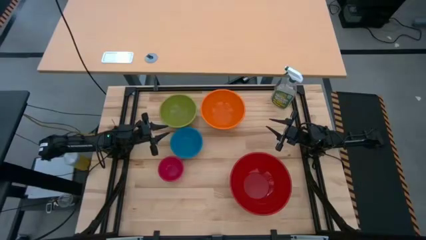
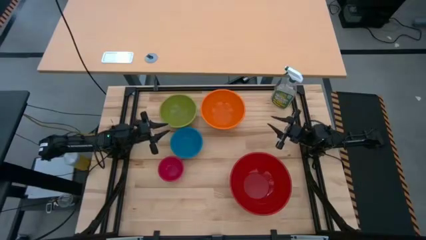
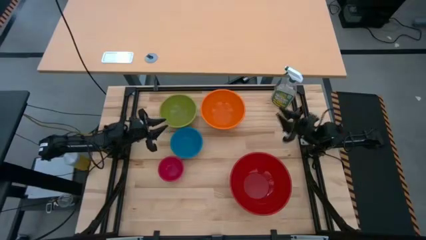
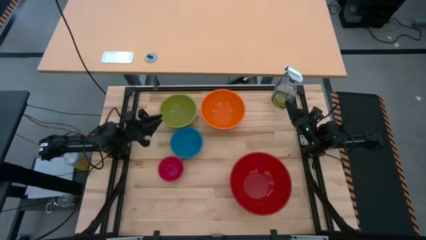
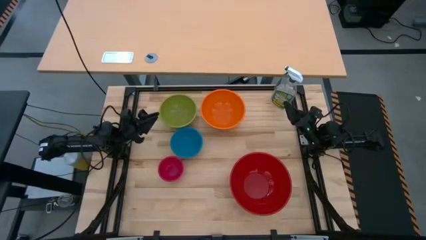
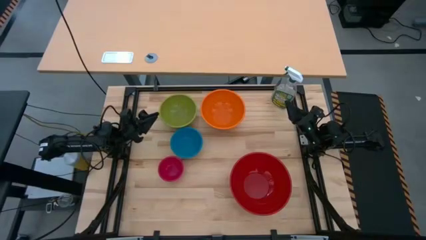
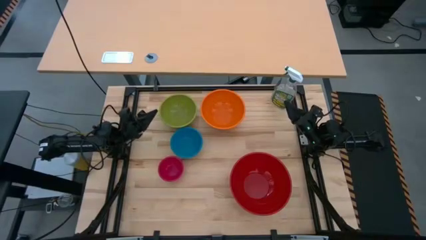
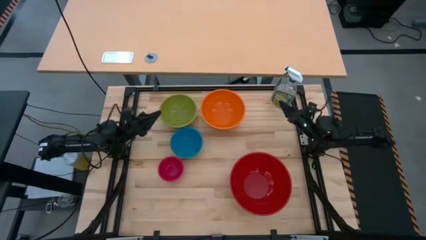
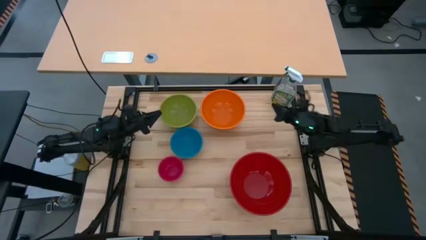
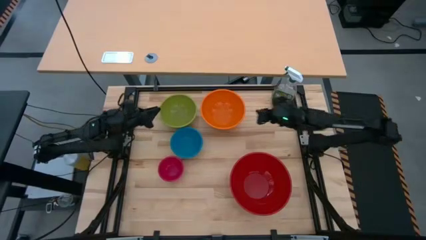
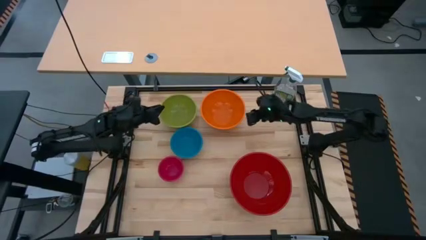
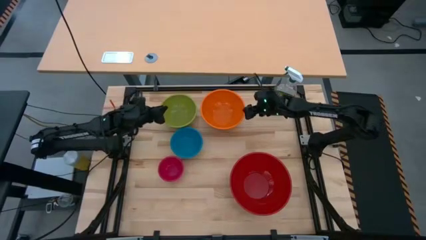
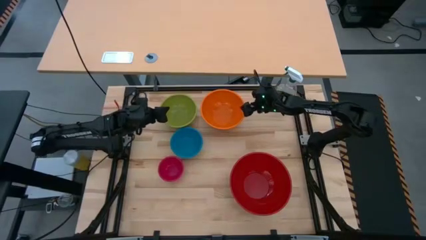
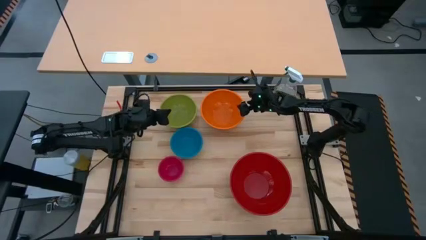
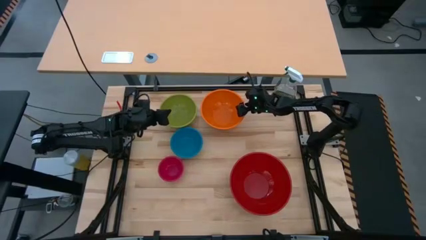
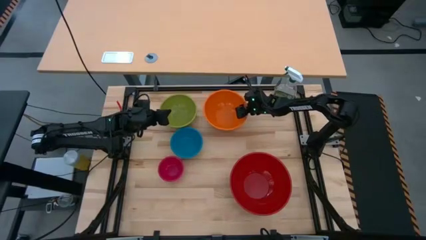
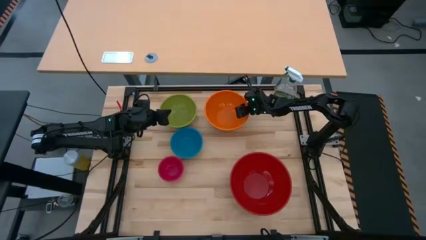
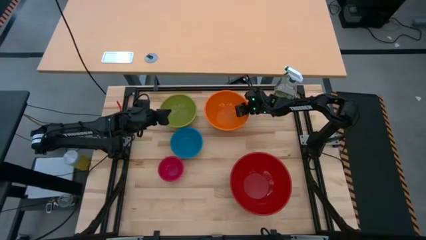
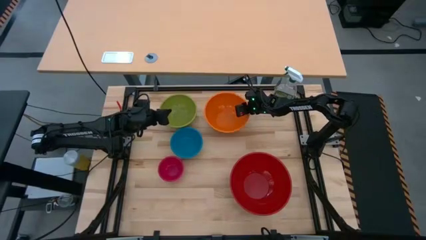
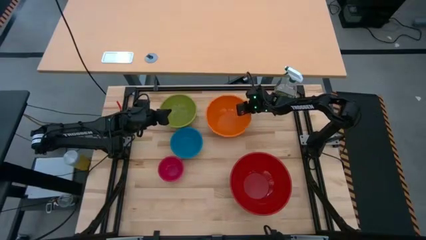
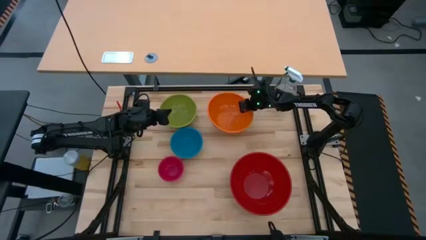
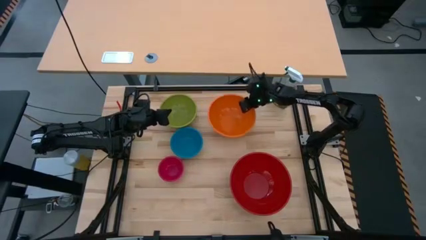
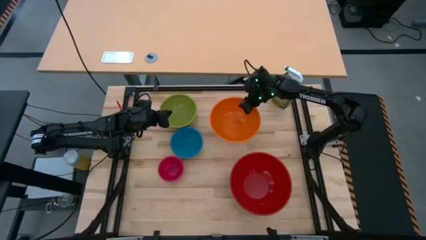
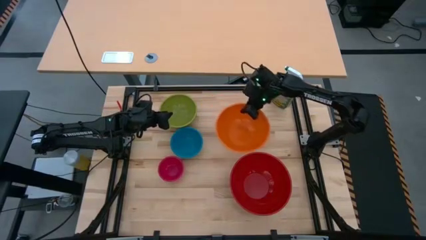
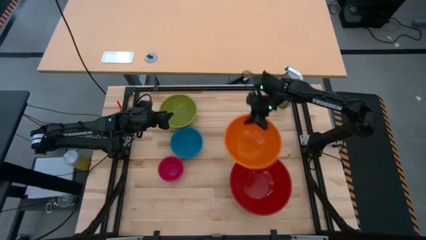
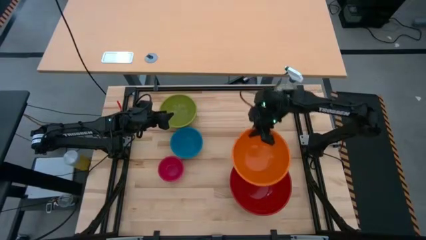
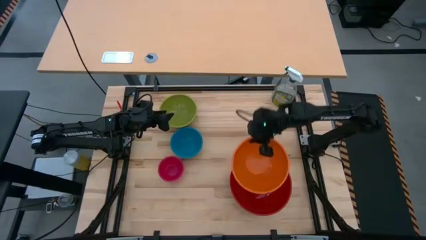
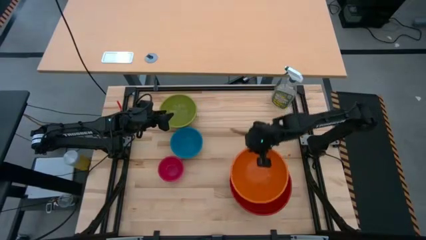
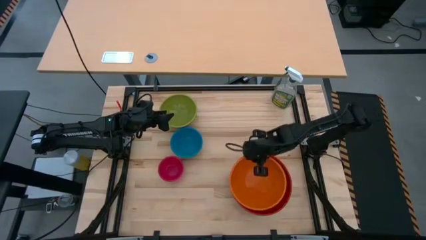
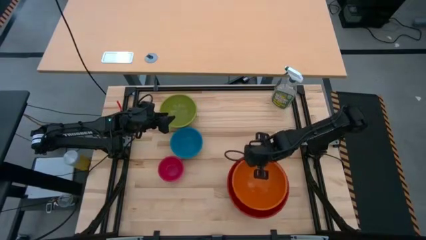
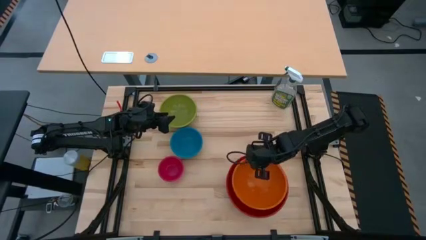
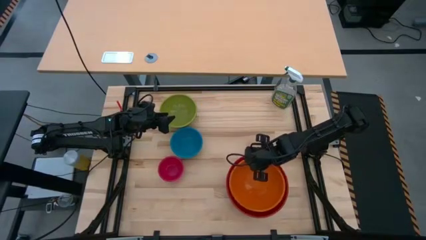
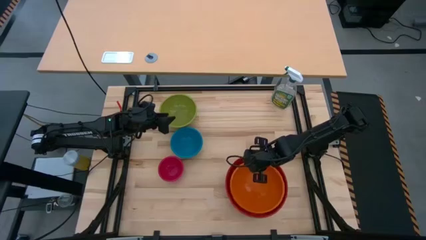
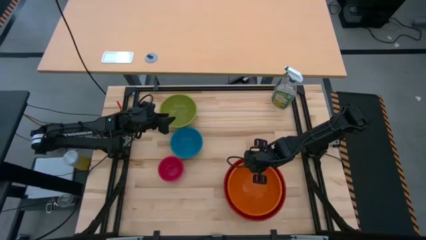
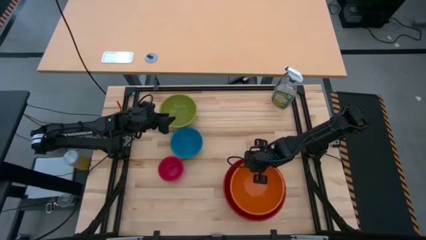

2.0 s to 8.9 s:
Stack the orange bowl on the red bowl

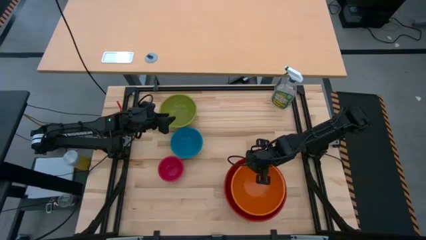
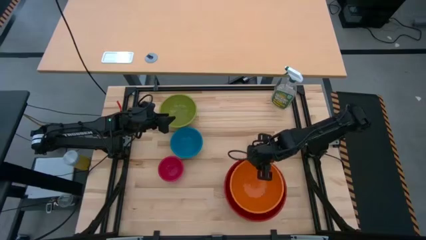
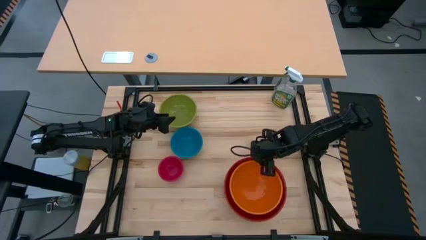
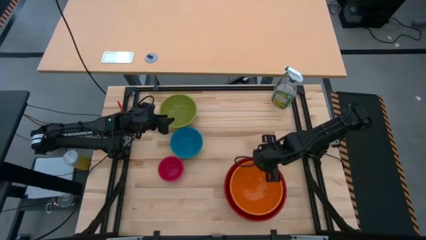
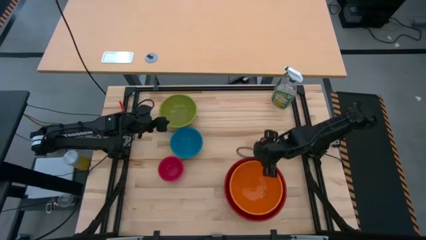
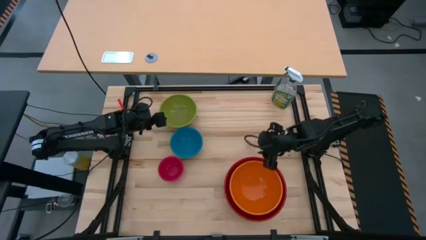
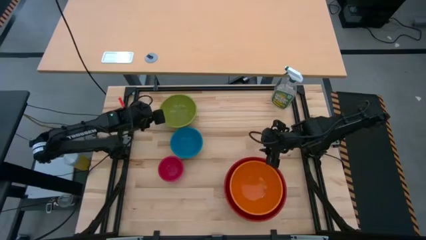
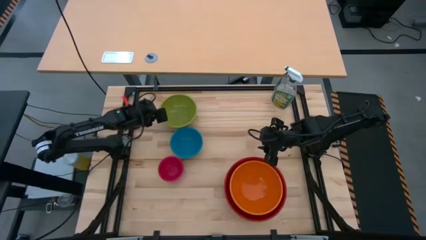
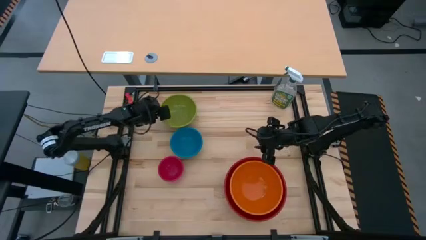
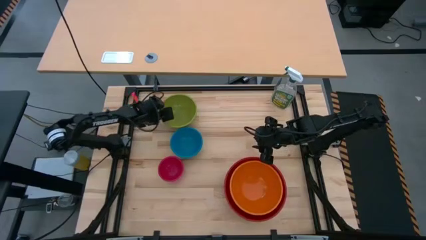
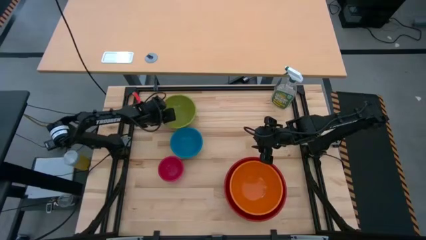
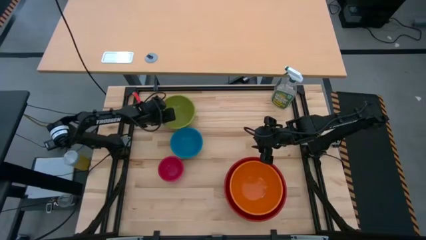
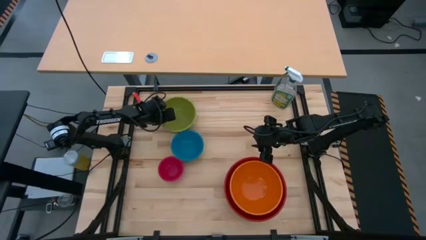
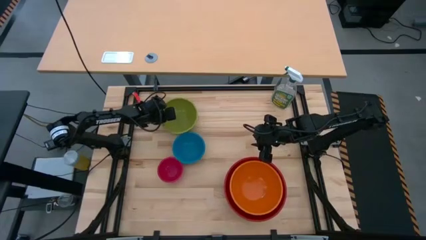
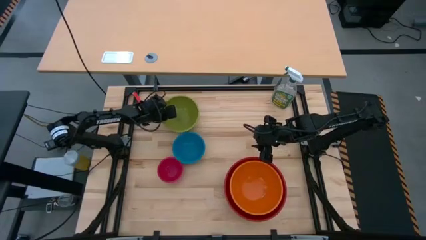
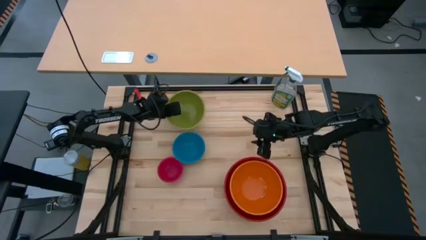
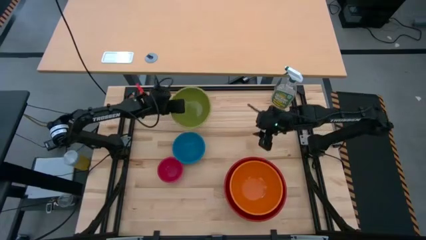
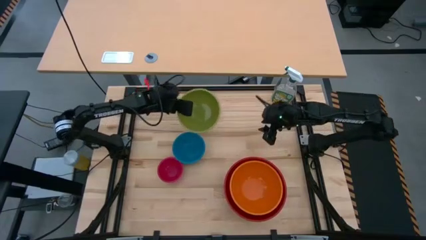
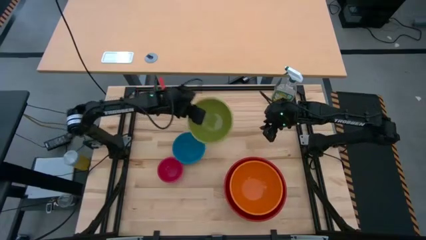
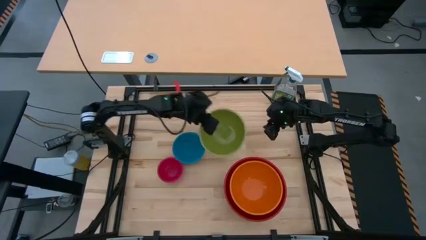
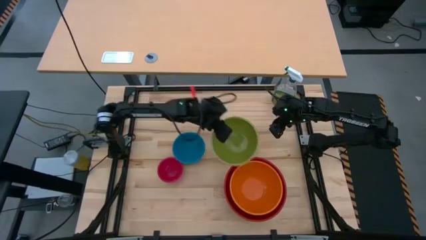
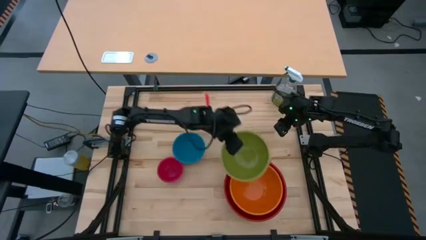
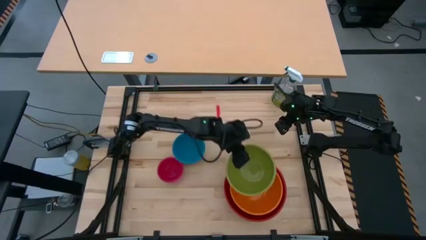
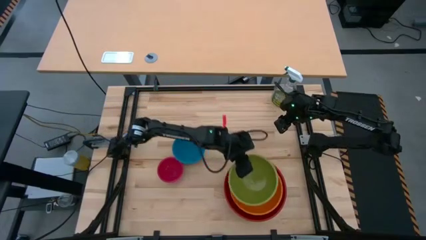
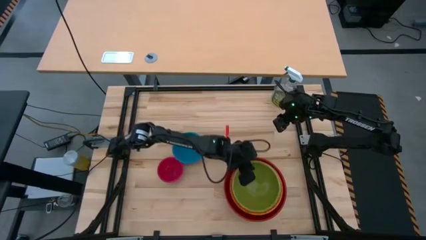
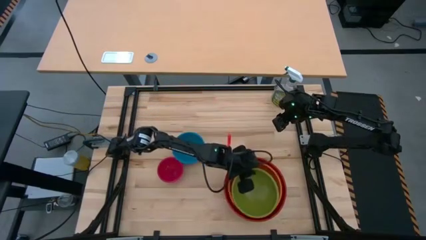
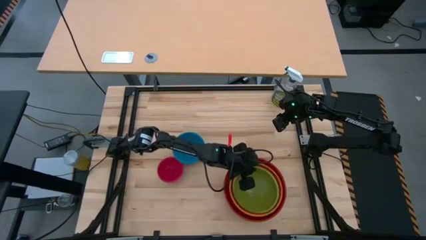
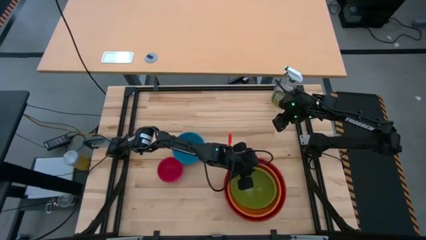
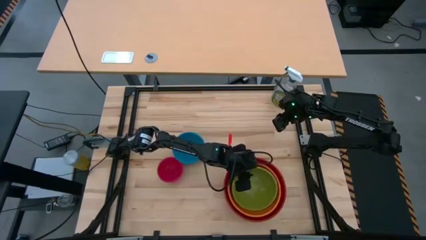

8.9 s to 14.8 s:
Stack the light green bowl on the orange bowl

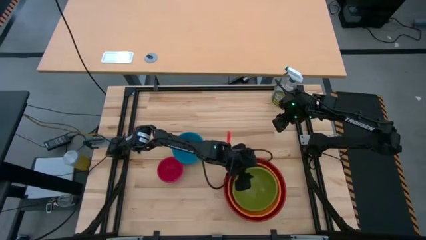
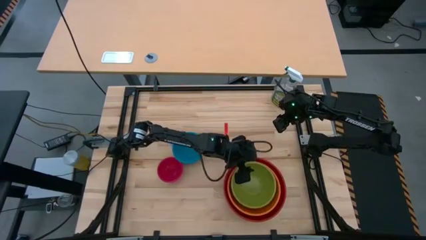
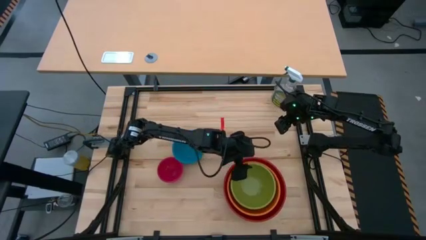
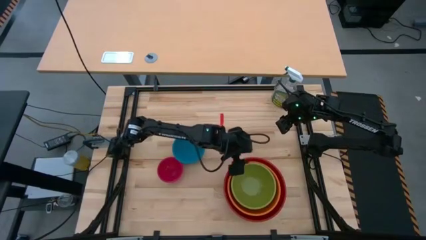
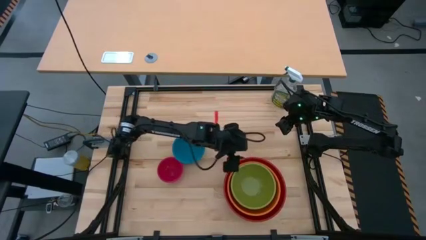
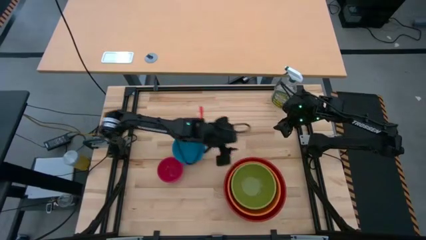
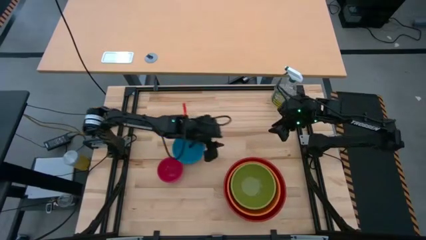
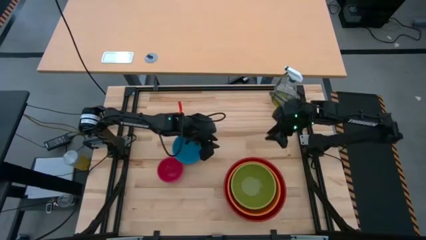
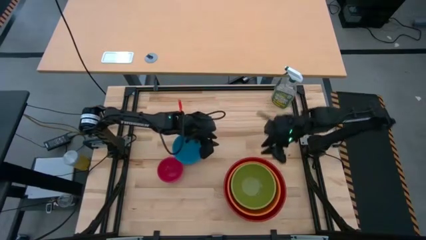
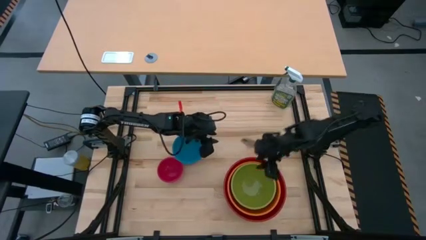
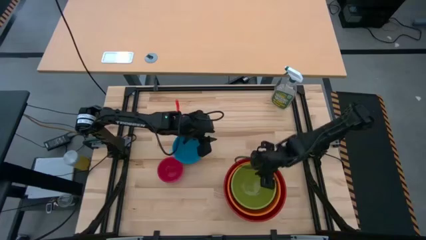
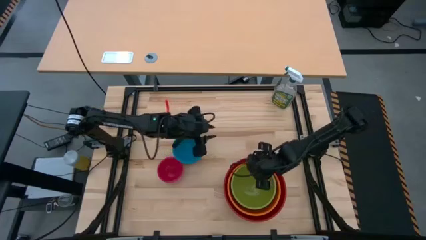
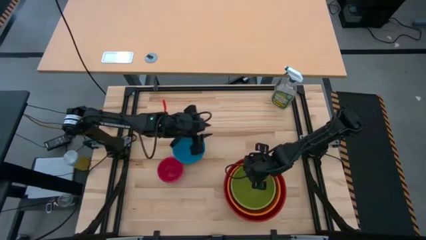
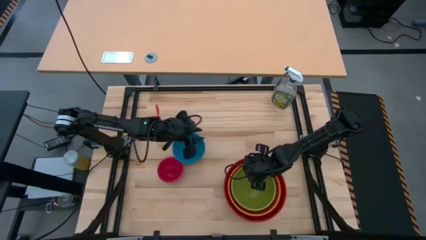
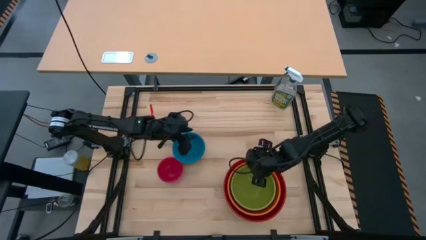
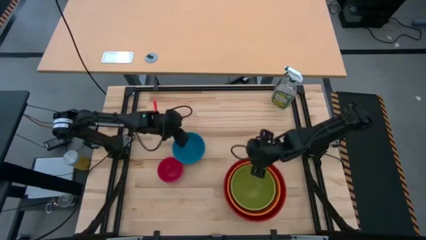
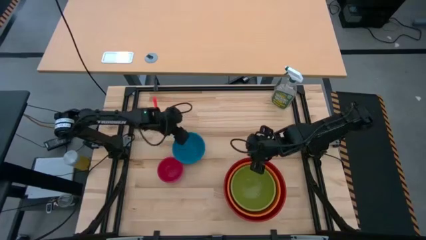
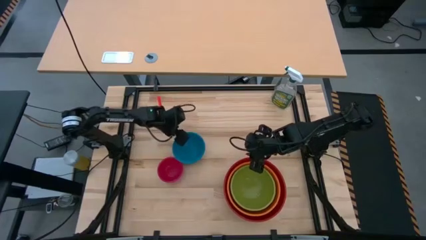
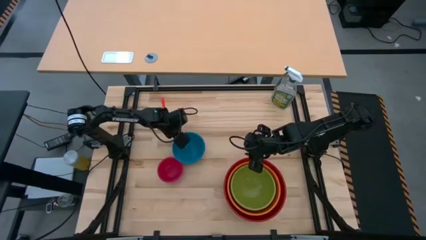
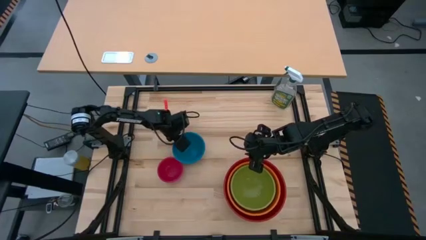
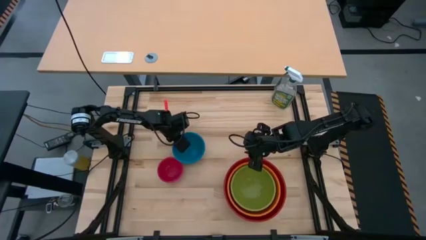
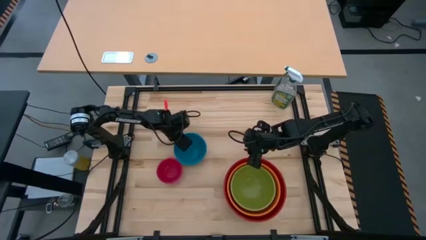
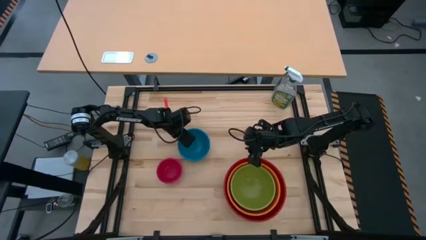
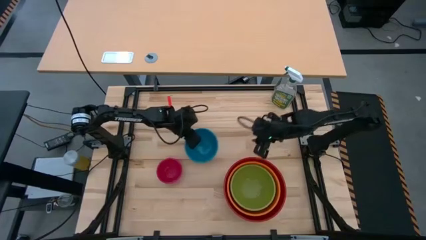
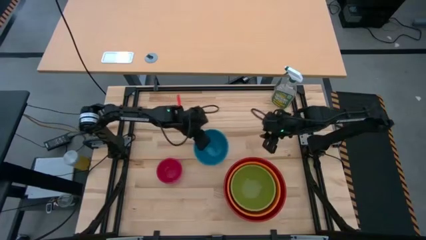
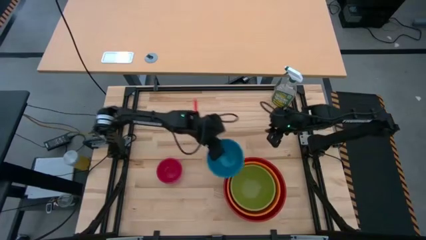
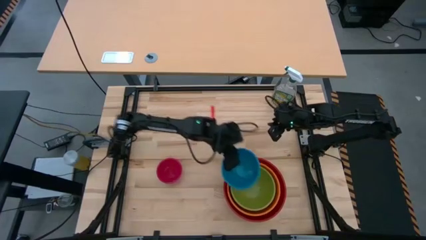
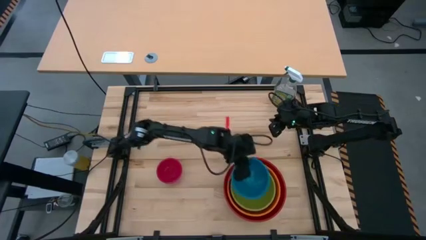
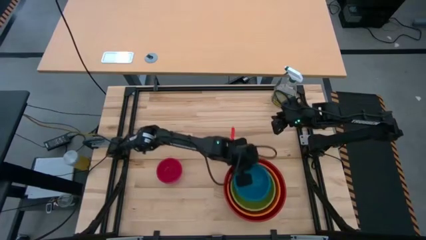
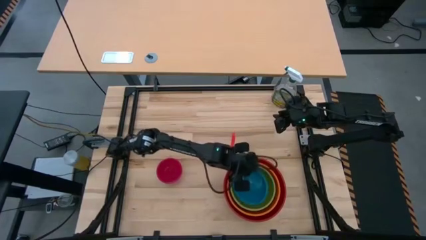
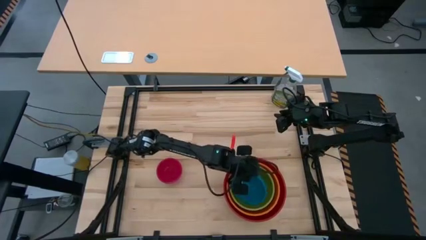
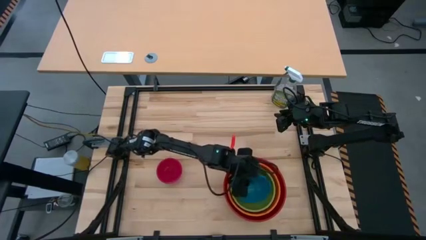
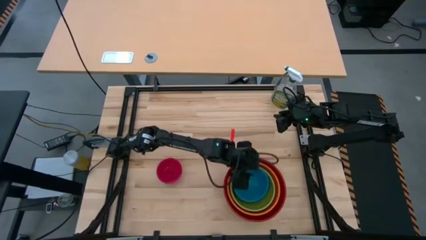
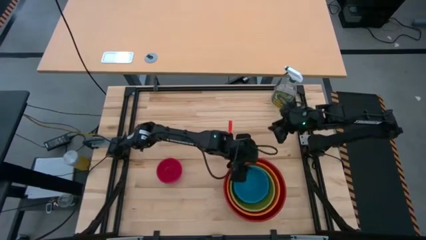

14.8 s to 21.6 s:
Stack the blue bowl on the light green bowl
